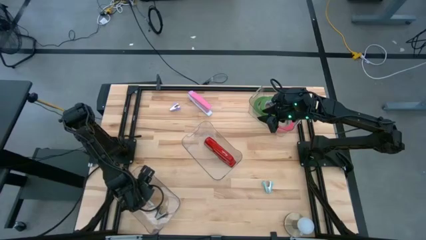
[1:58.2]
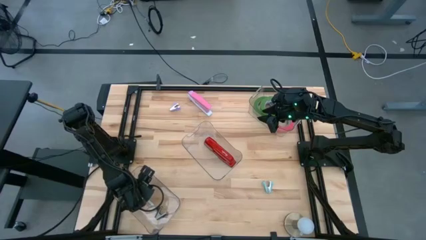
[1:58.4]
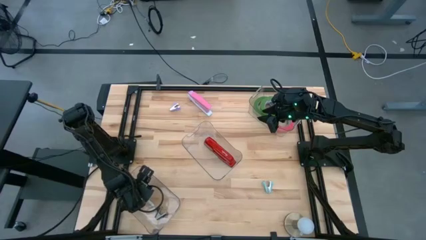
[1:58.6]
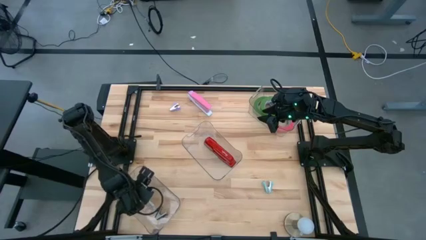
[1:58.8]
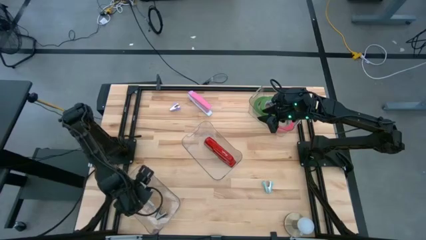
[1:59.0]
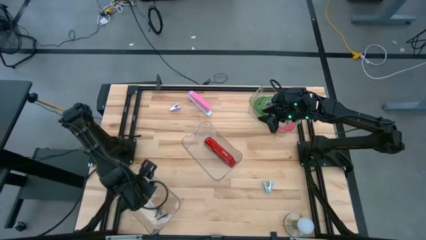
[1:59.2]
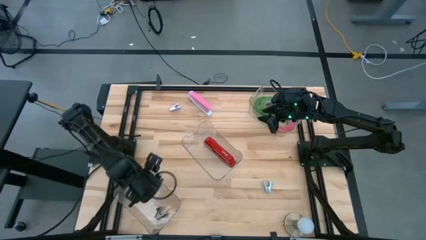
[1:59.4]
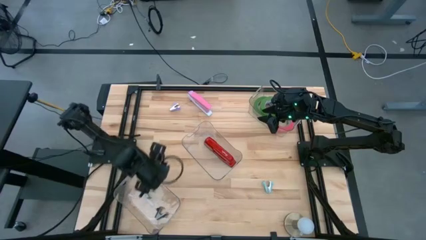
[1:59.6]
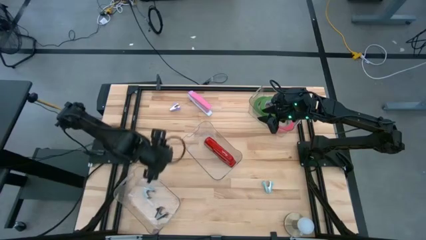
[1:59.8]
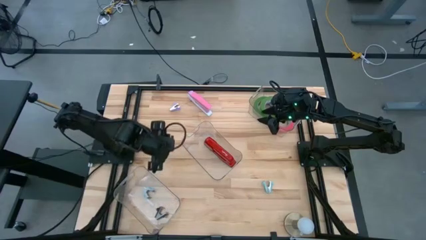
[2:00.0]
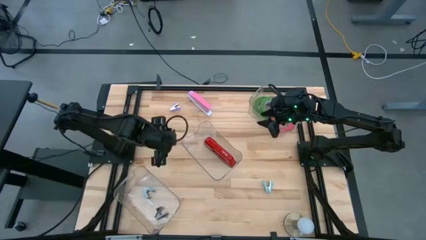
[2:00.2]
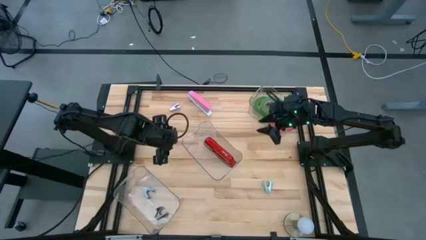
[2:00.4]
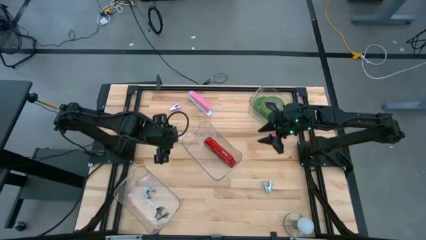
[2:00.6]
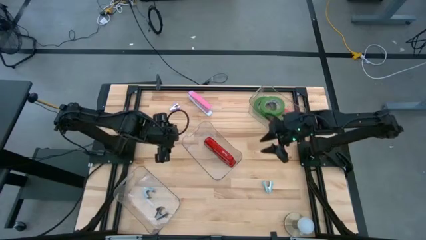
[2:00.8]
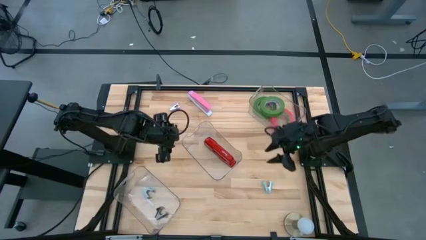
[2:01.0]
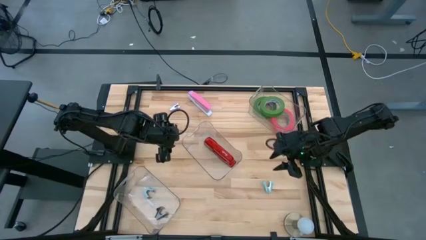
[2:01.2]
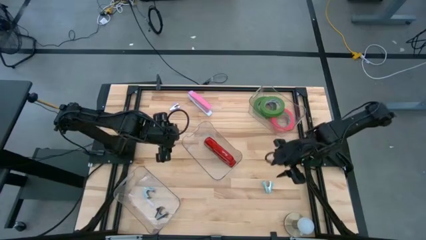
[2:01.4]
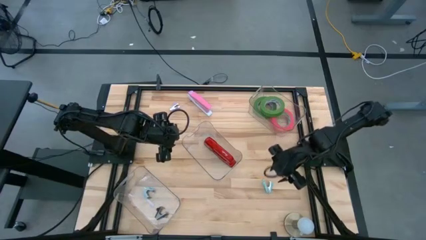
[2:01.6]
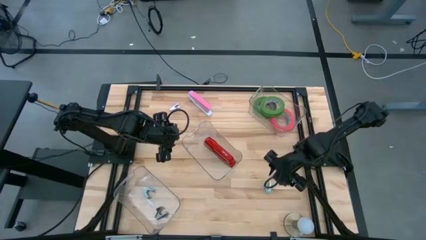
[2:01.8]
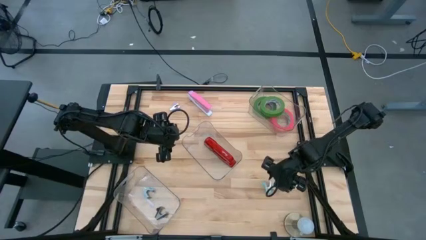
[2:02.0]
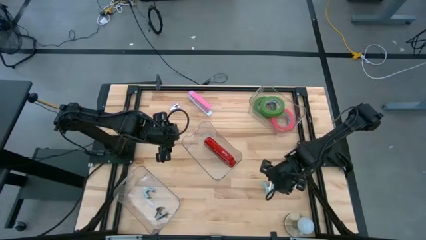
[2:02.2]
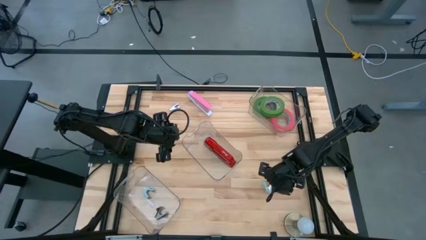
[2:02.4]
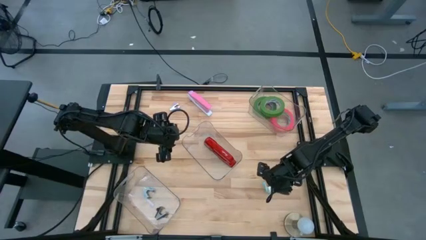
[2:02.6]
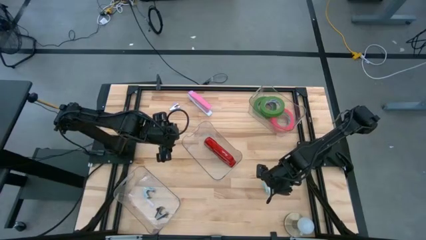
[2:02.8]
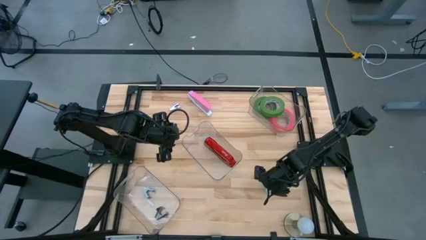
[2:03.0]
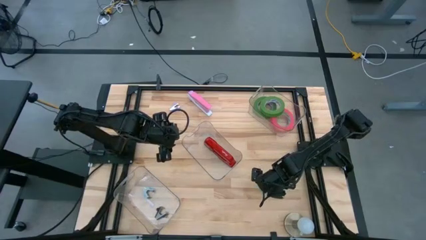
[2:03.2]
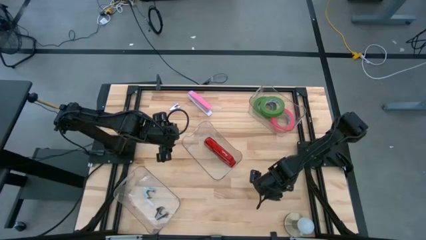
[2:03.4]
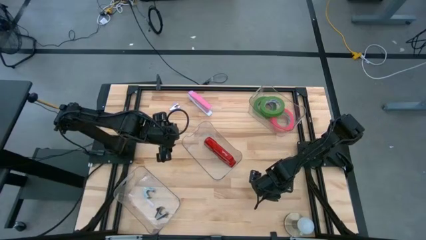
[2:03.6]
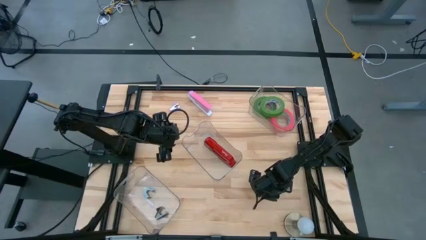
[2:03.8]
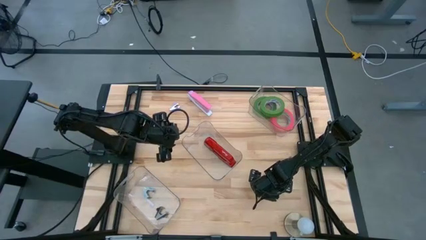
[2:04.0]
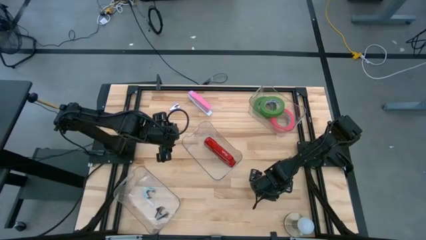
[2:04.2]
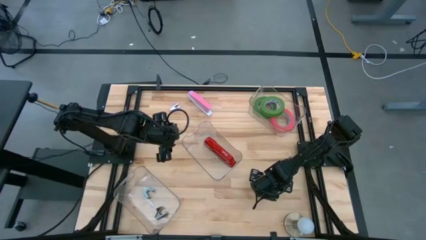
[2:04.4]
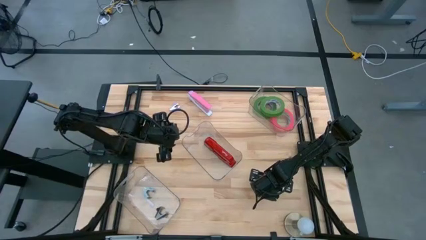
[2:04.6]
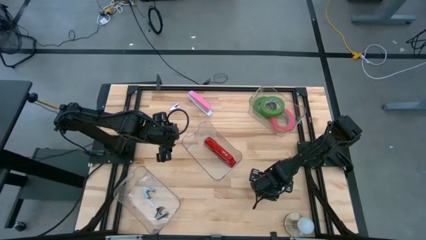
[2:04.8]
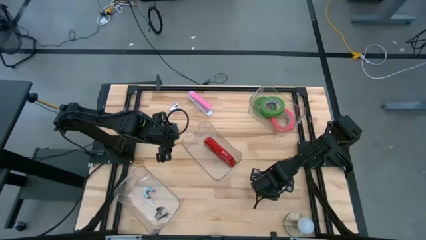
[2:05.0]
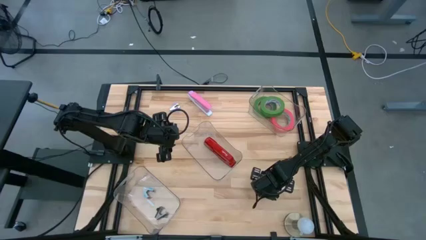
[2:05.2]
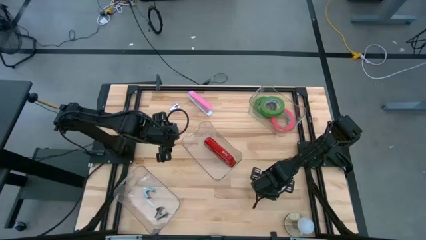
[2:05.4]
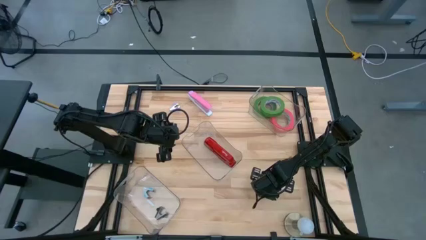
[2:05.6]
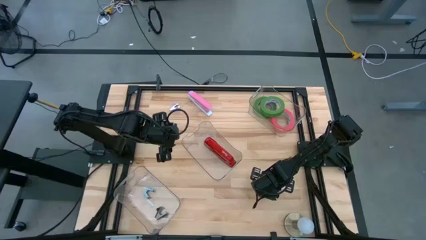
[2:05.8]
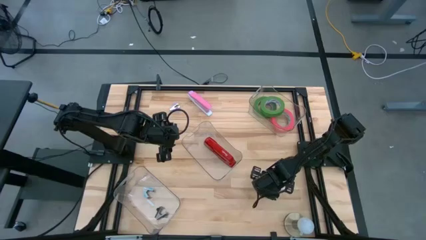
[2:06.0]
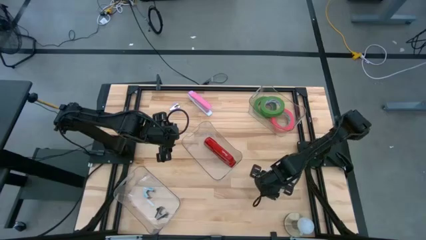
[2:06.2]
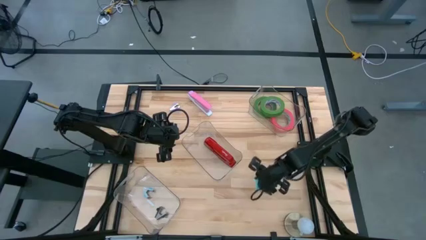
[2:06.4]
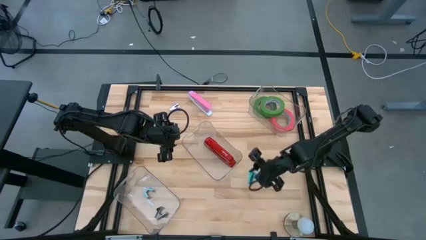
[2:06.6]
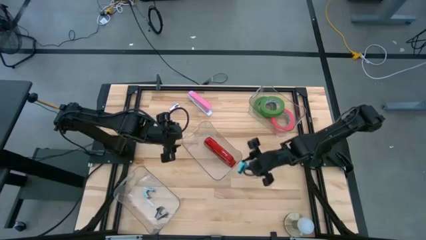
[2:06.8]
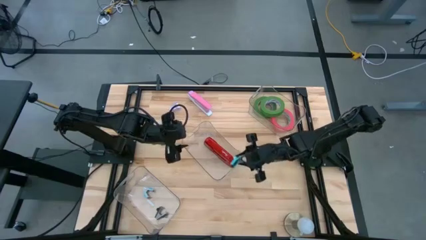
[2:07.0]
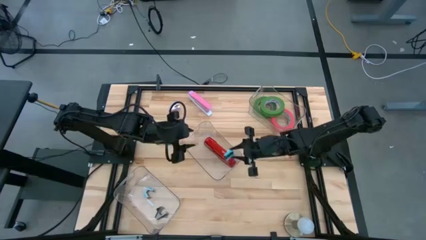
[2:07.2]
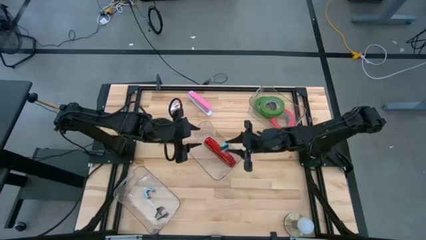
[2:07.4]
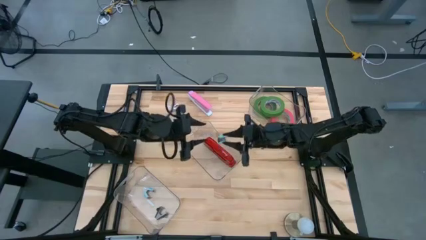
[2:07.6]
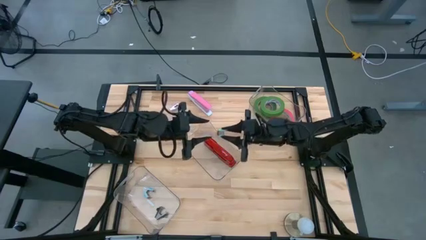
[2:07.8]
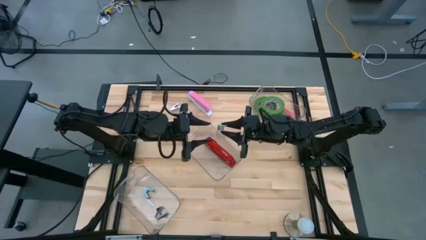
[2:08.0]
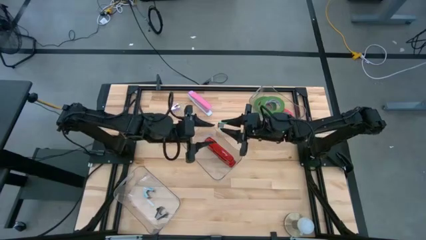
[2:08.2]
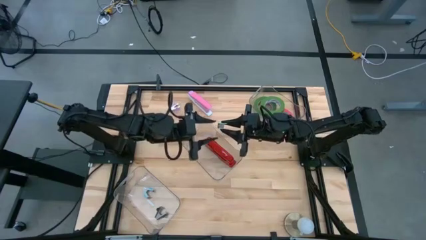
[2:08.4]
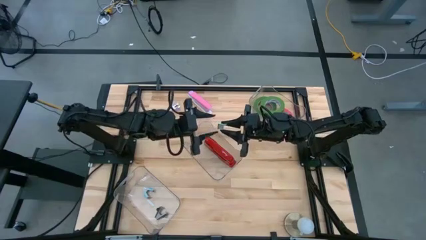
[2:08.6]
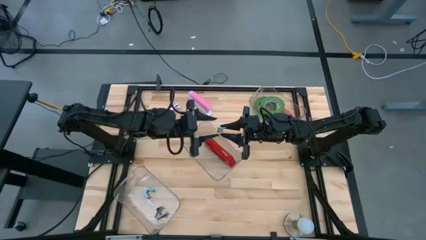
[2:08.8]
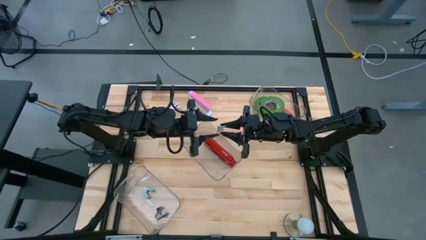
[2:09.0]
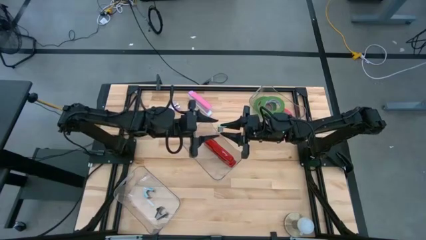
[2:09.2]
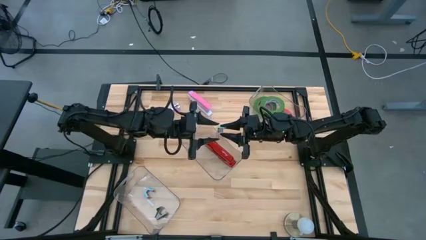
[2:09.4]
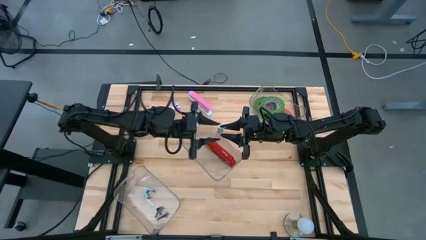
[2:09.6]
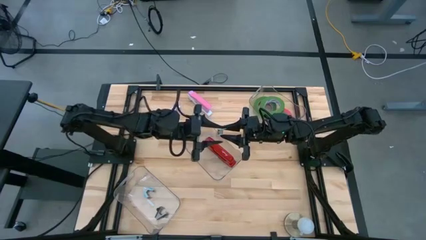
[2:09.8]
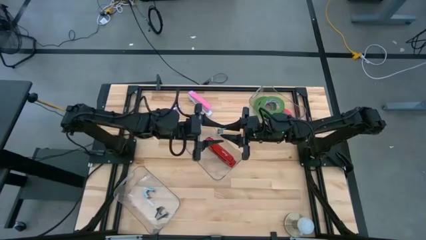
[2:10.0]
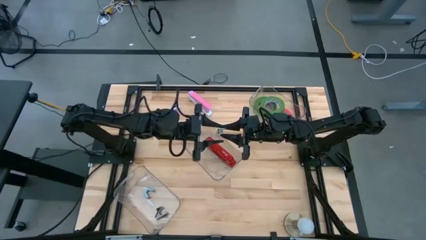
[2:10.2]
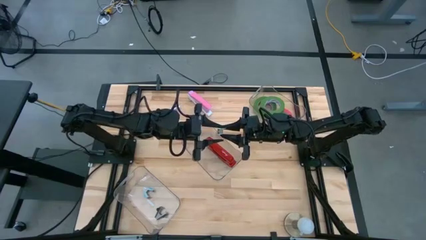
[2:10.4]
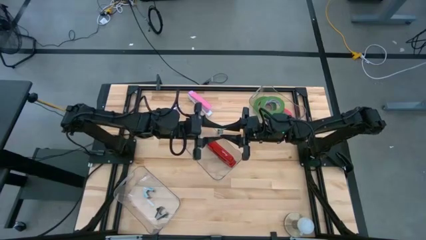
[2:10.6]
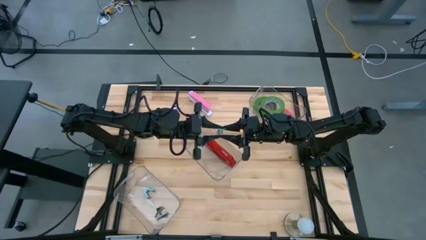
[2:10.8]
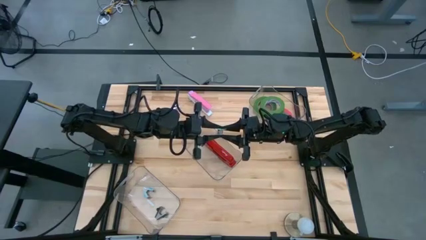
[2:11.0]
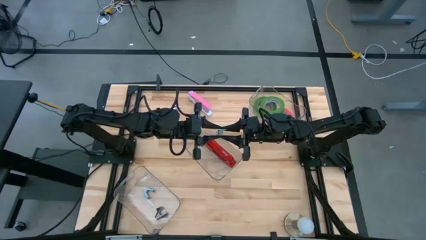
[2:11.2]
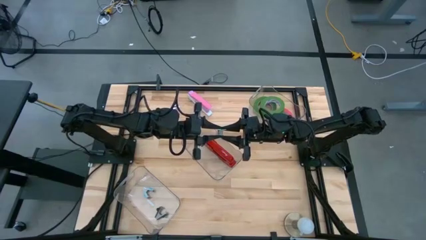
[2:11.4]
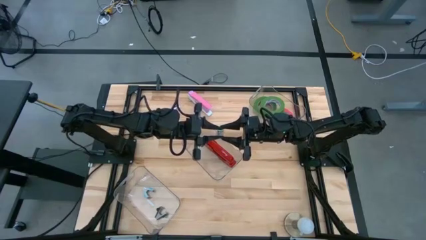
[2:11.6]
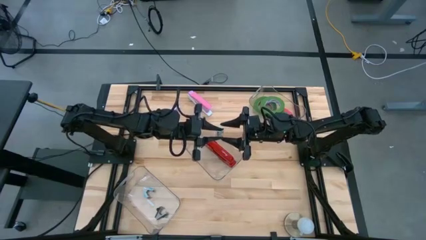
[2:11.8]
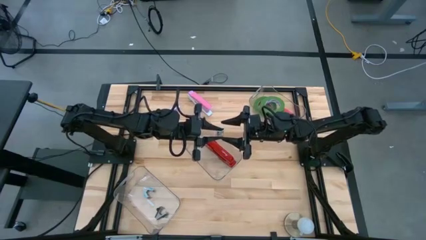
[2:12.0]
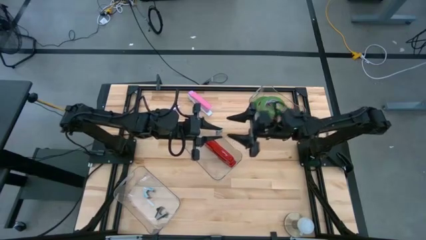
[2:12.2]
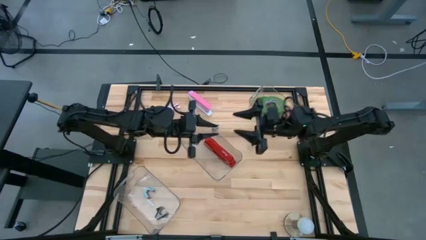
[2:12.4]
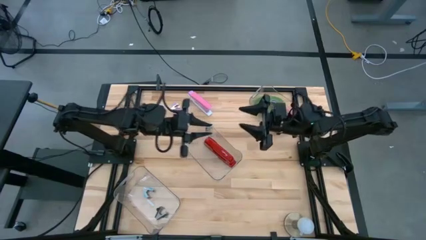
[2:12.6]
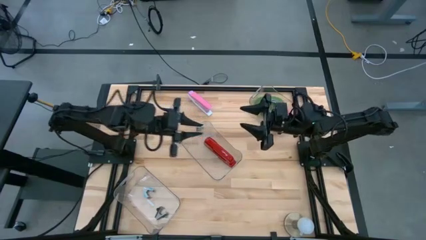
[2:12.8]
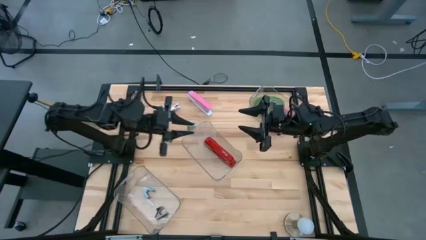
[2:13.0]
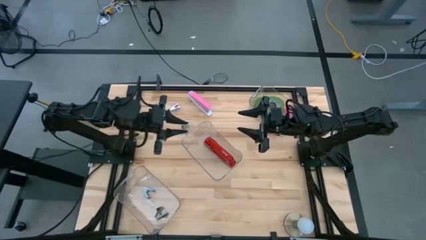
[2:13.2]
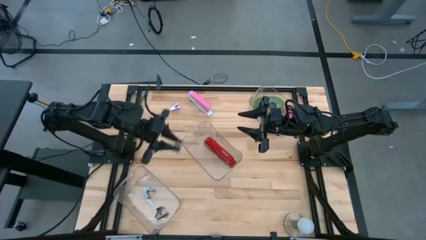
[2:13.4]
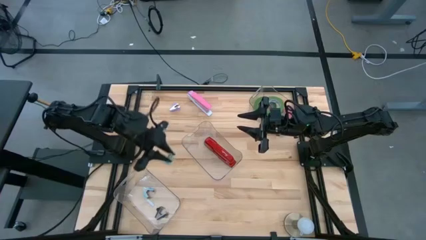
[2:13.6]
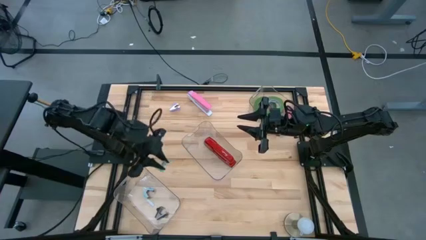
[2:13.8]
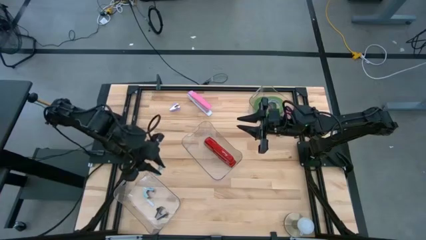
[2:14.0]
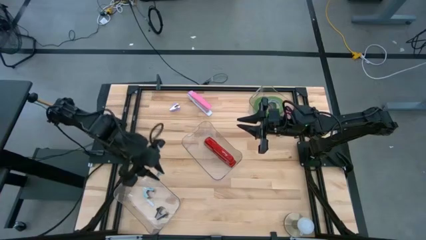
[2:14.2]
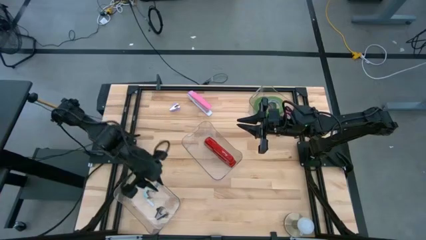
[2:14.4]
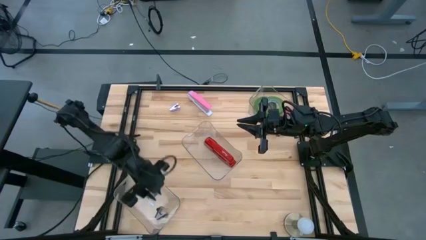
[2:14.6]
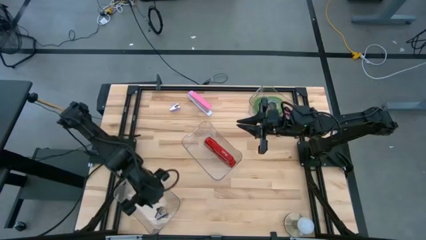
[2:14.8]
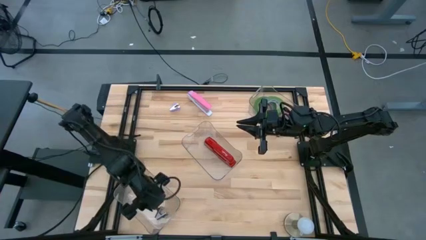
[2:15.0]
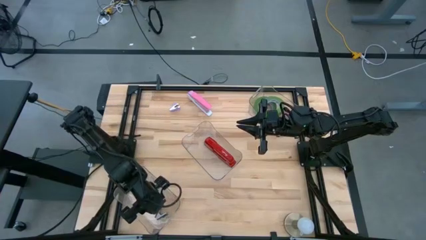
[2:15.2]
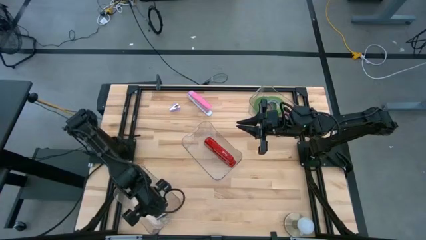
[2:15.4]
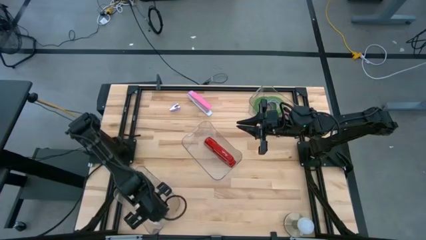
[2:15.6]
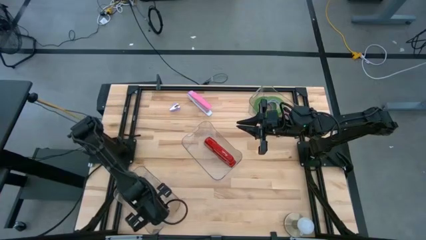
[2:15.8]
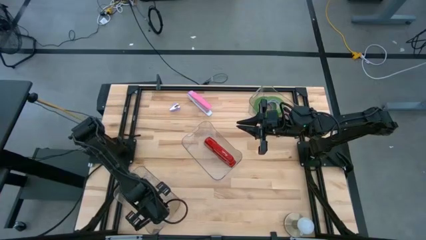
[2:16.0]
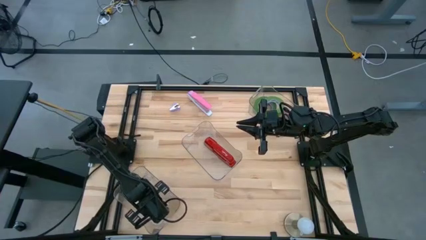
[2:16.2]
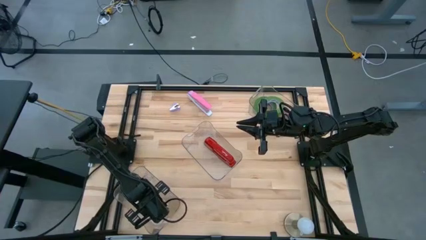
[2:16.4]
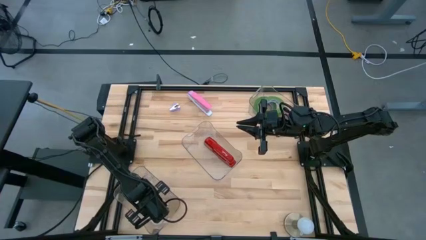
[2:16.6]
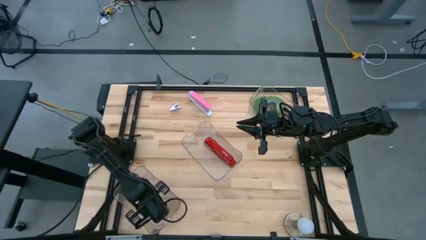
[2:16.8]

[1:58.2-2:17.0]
Task: Pick and place Stapler, Stapler remover, tape
Put the blue staple remover into the bottom transparent bin
